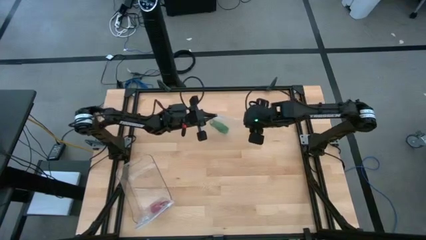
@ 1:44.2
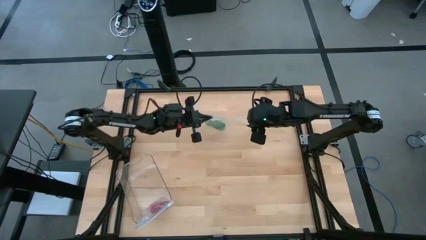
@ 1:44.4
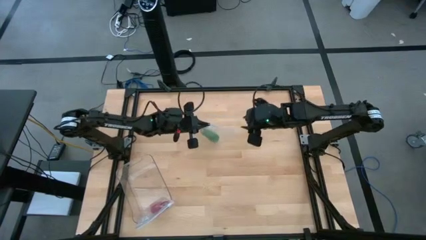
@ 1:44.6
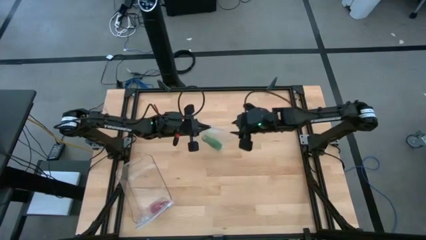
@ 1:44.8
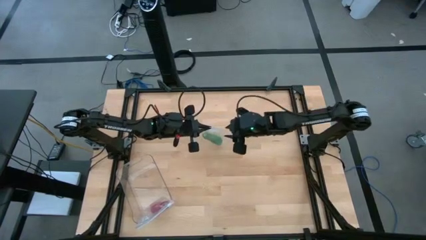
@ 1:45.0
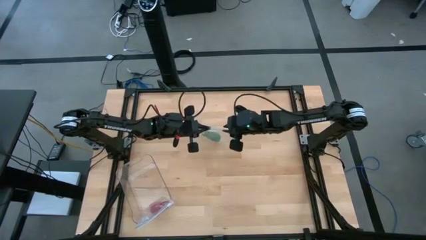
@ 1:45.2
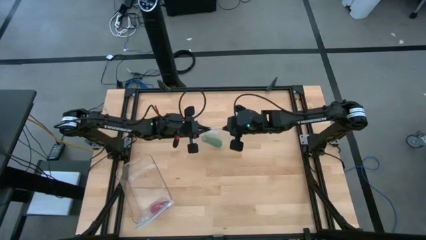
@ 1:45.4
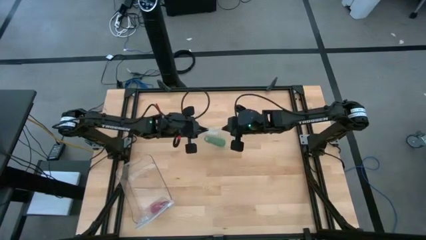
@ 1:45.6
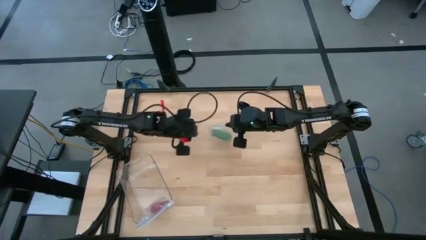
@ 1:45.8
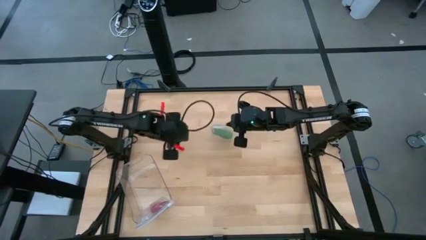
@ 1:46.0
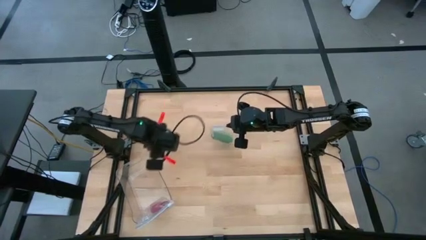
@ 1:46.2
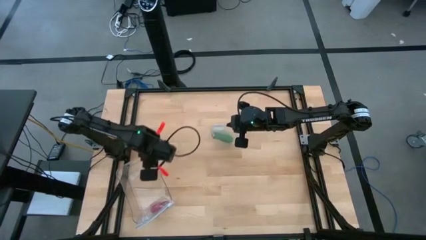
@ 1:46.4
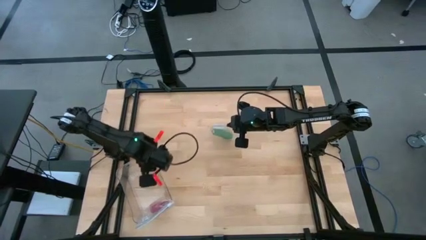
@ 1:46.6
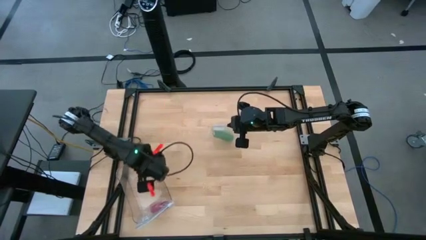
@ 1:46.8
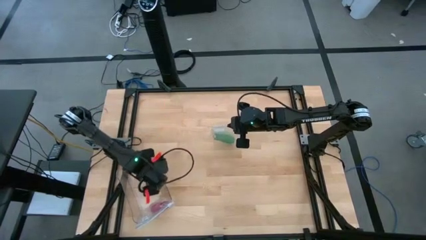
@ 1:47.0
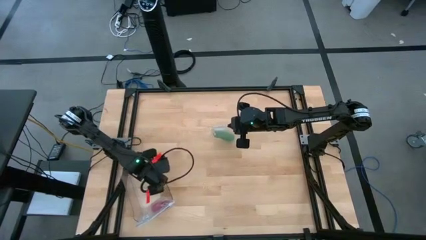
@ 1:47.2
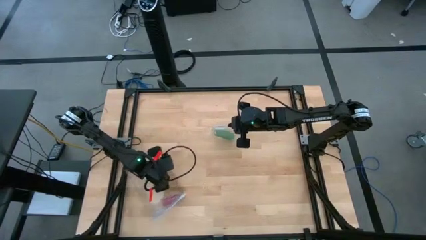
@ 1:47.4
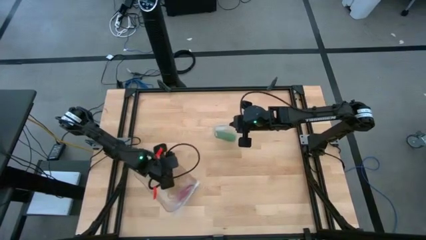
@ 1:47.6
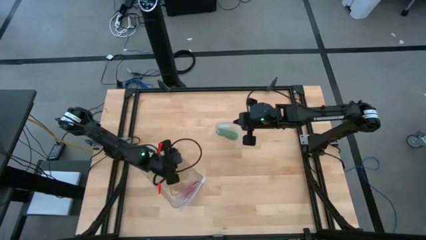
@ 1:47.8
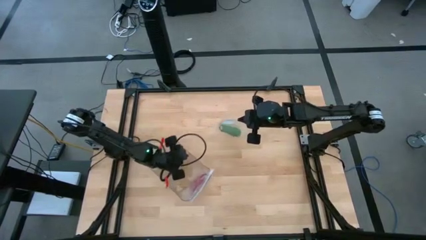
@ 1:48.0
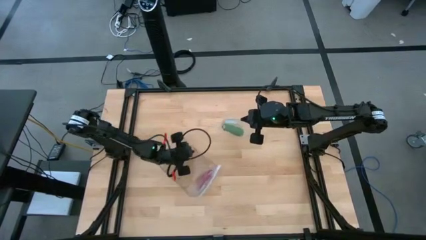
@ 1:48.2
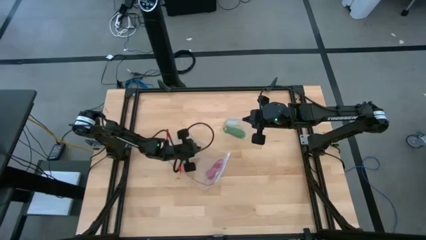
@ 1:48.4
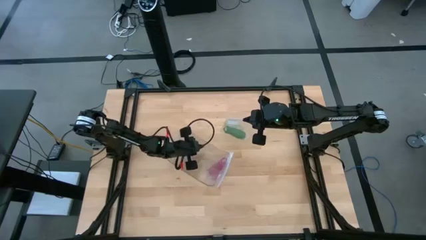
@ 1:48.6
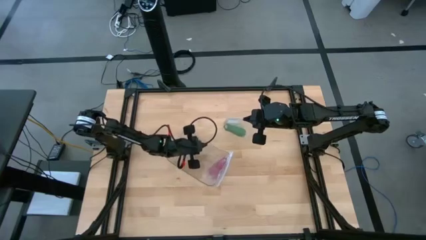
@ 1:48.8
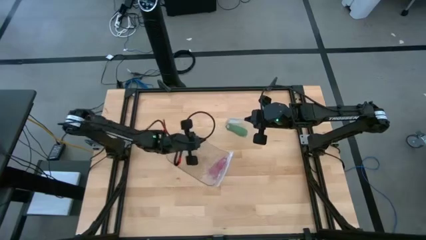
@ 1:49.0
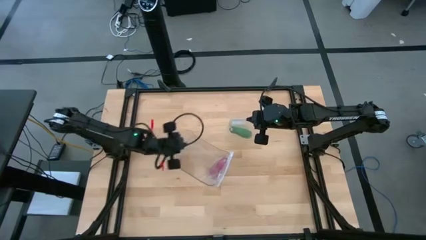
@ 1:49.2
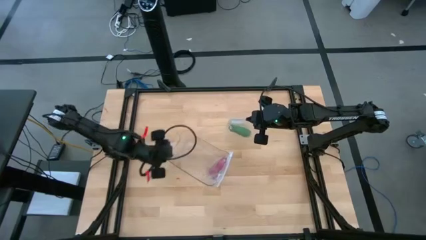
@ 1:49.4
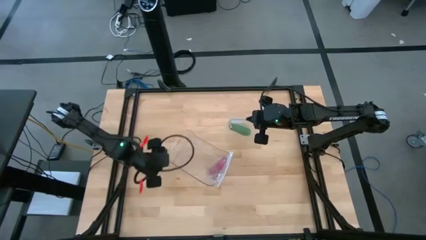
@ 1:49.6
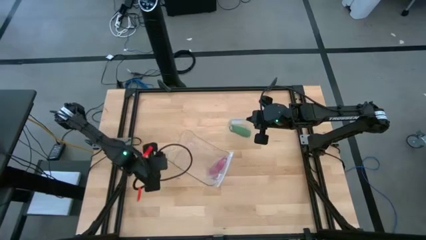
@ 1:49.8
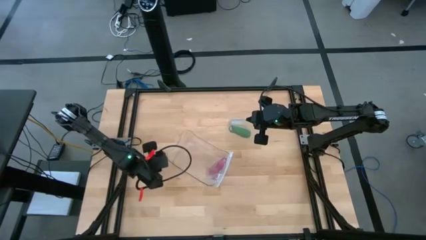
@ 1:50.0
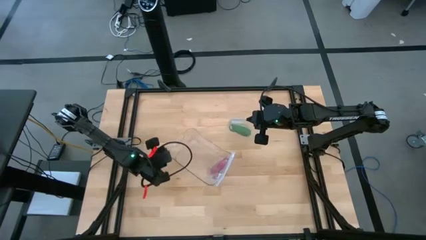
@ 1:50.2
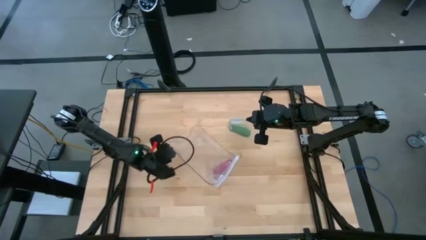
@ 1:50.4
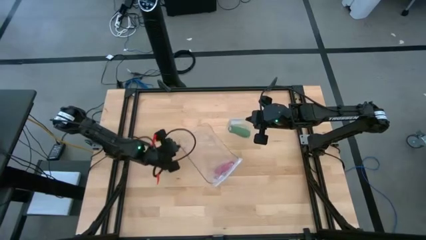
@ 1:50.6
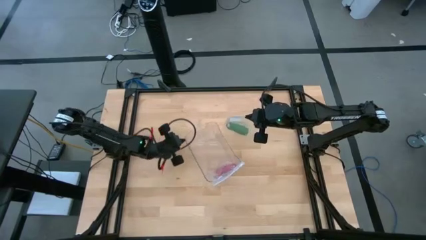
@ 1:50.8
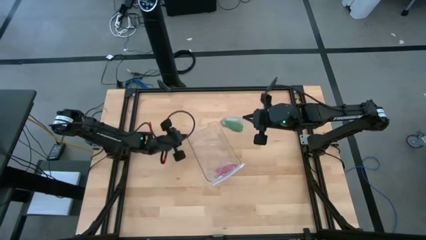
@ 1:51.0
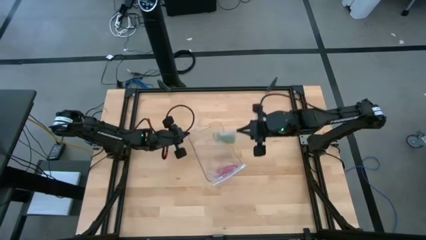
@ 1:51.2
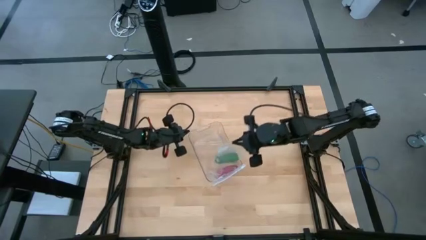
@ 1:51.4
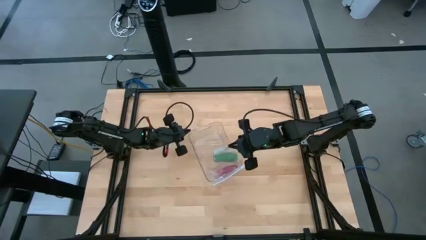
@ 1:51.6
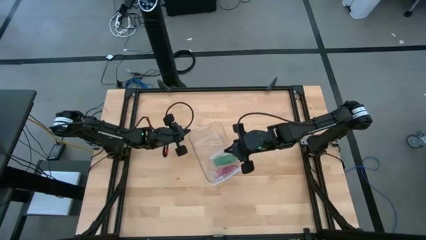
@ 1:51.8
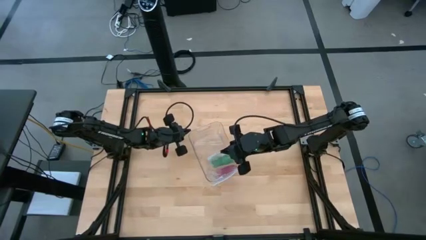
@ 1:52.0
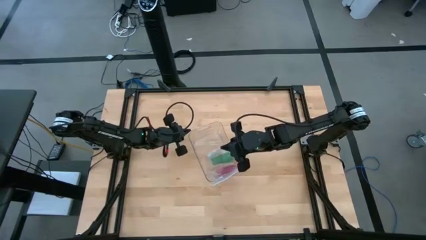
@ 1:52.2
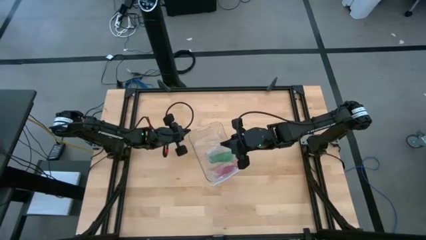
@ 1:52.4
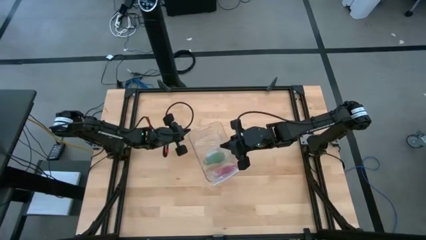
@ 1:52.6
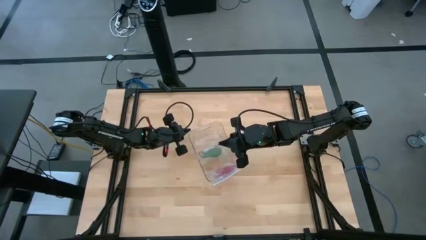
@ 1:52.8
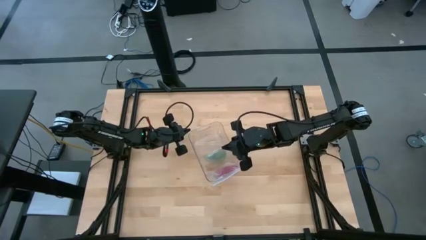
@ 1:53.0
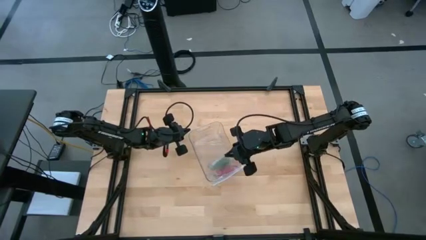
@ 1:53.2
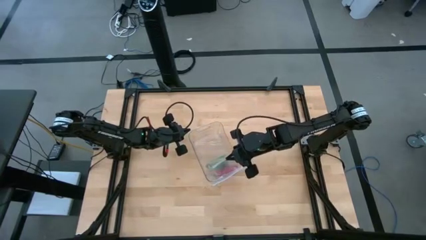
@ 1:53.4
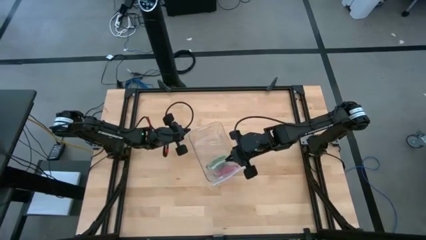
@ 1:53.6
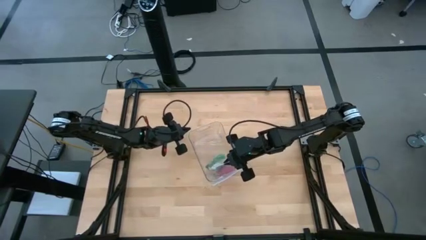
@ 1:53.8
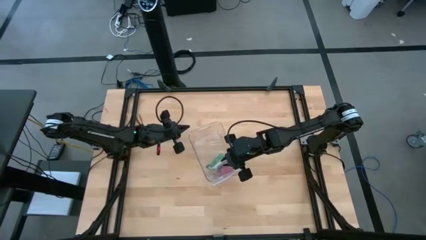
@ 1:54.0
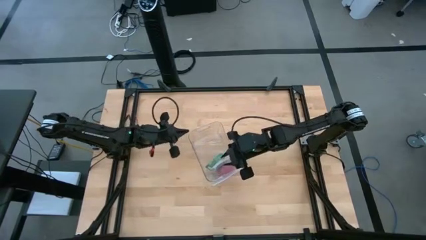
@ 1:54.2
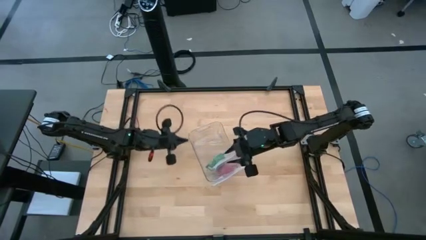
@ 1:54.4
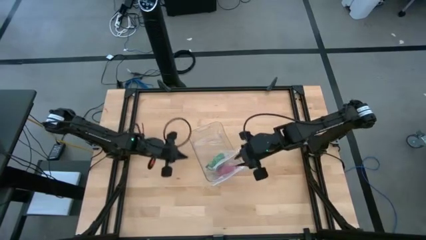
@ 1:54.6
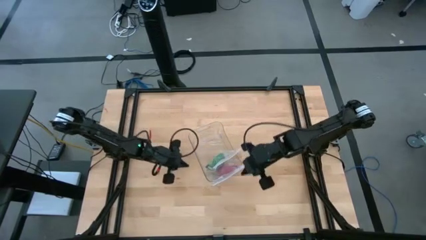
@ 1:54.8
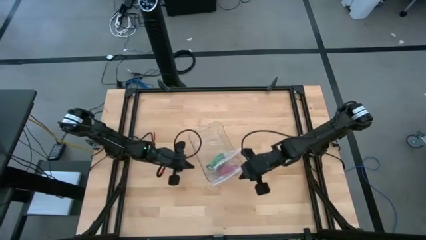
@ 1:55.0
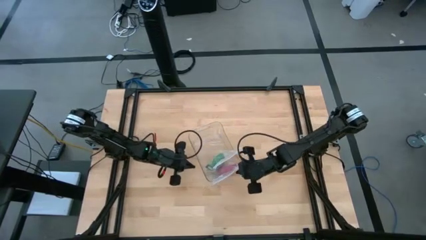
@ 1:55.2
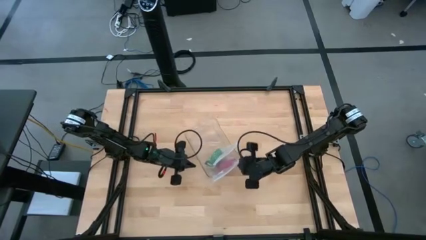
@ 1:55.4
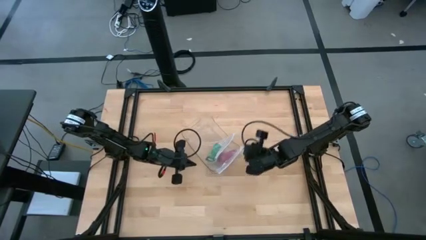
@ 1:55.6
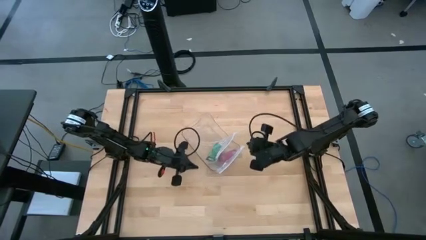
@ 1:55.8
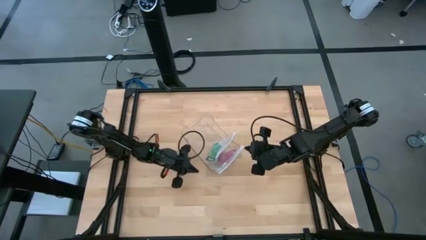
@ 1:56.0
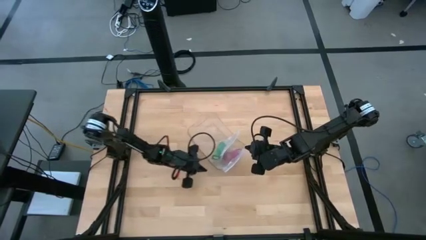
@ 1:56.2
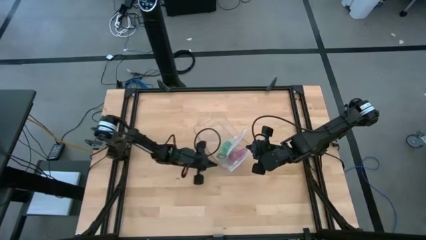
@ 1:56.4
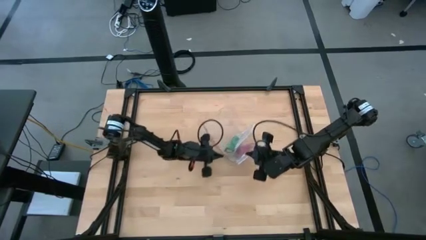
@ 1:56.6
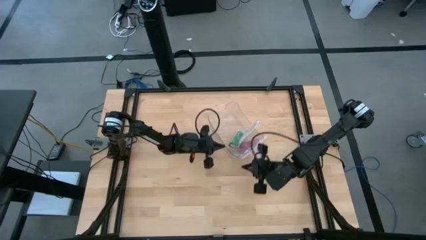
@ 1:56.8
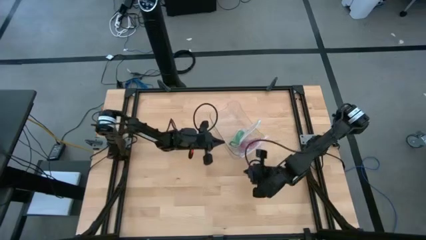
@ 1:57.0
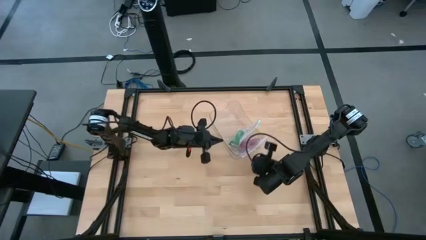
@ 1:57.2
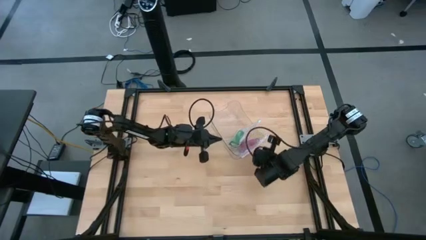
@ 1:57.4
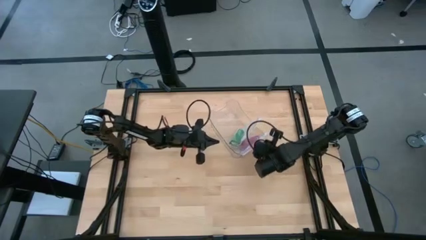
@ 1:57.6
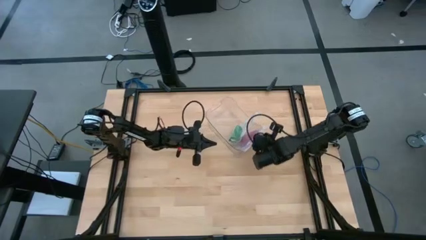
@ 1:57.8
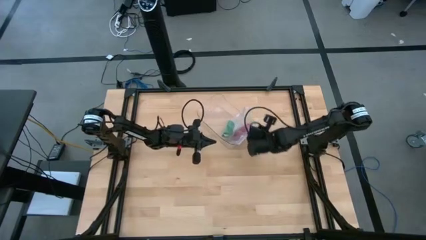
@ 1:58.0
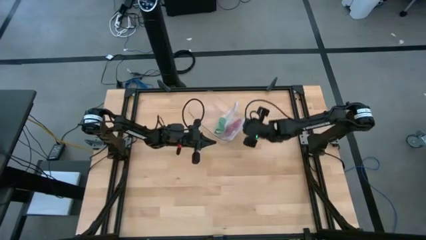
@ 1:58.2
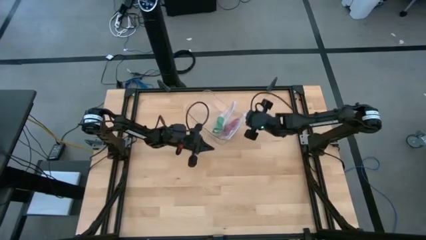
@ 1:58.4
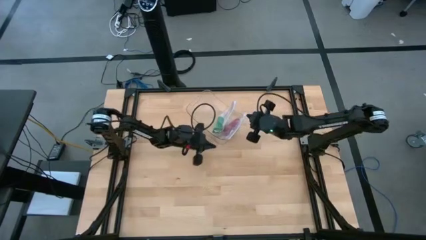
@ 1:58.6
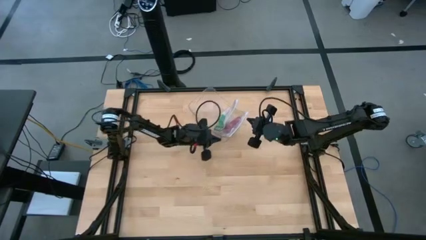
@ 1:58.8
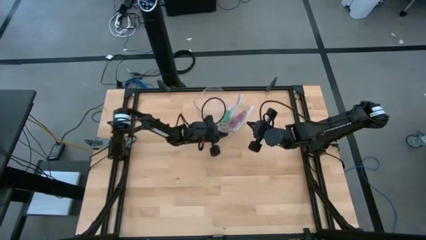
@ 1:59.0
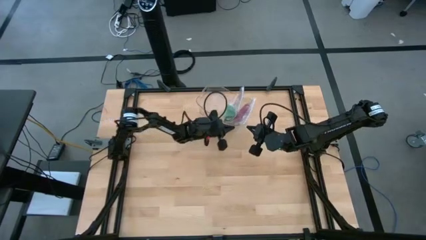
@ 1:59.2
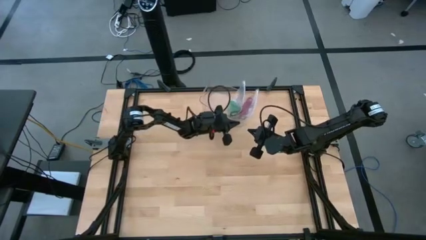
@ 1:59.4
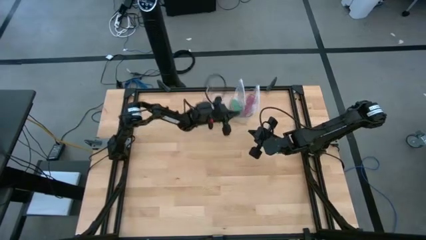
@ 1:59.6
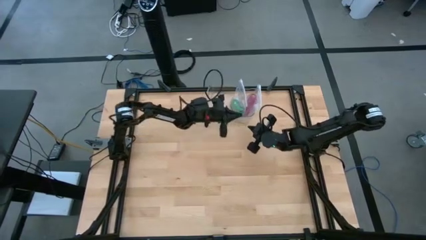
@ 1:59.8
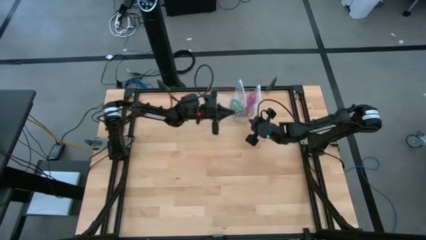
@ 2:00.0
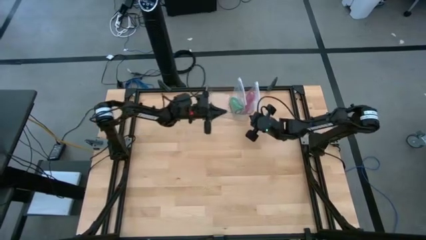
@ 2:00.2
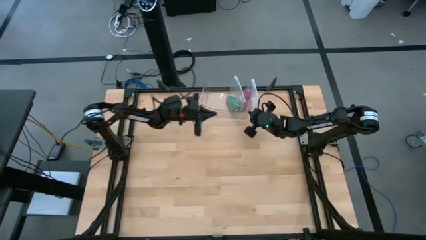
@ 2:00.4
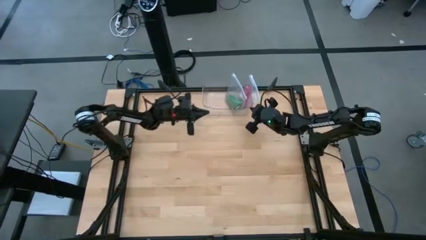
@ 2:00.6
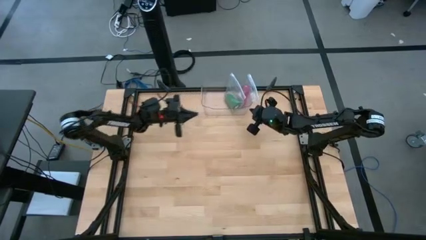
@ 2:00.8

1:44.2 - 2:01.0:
Task: Roll bandage
Put the transparent zip bag with the rolled bandage into the transparent bin
